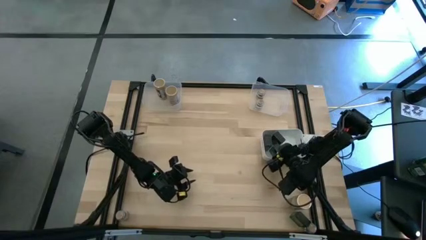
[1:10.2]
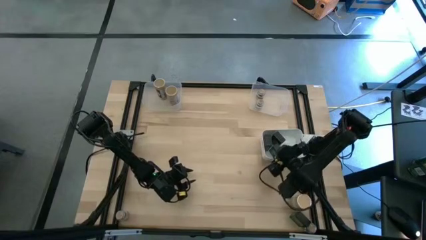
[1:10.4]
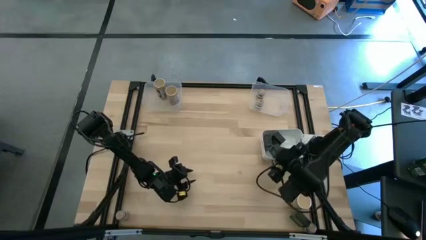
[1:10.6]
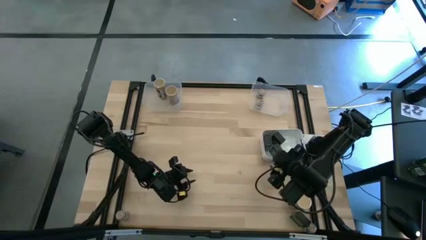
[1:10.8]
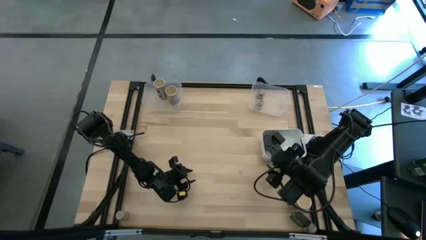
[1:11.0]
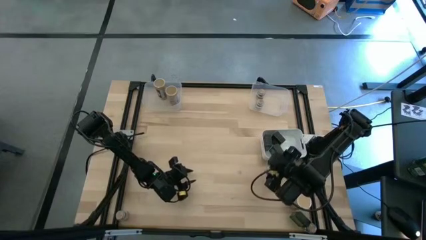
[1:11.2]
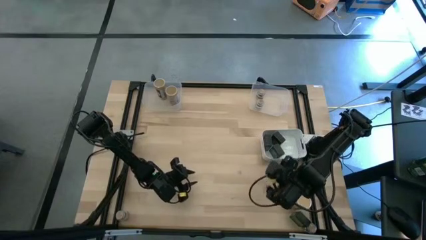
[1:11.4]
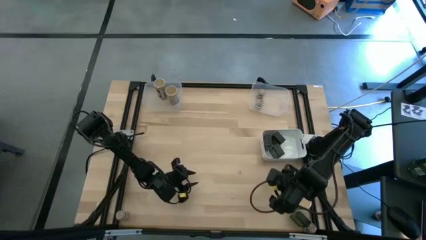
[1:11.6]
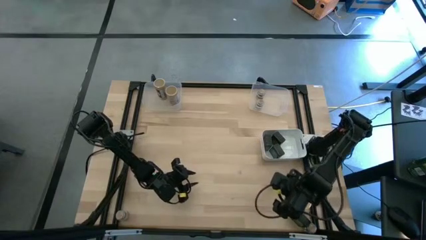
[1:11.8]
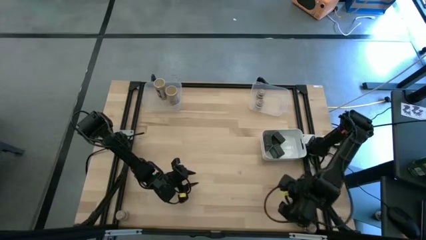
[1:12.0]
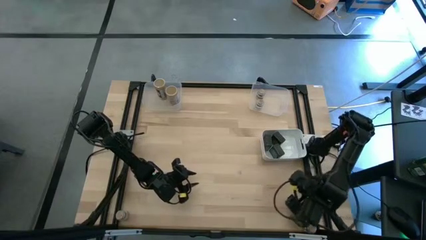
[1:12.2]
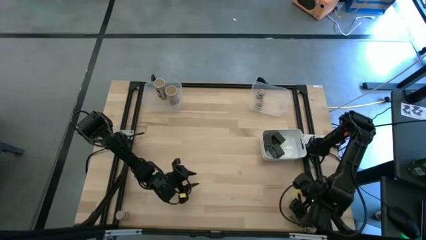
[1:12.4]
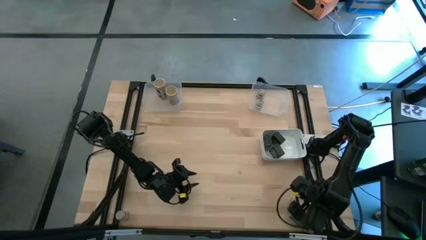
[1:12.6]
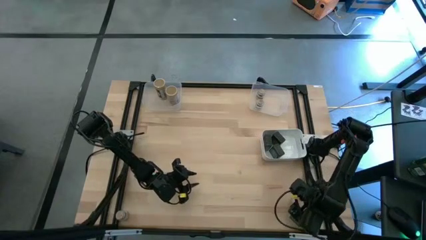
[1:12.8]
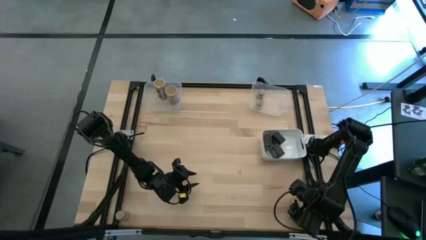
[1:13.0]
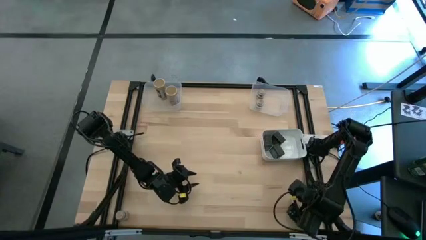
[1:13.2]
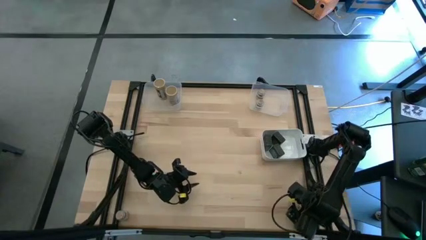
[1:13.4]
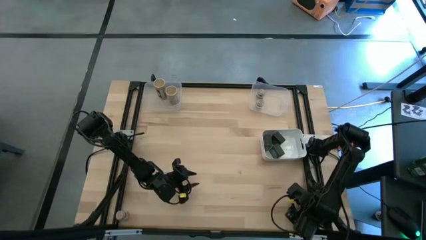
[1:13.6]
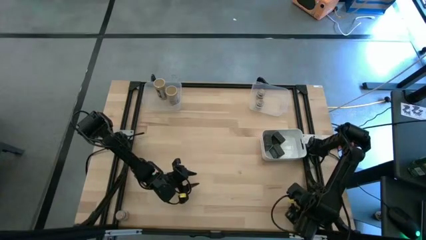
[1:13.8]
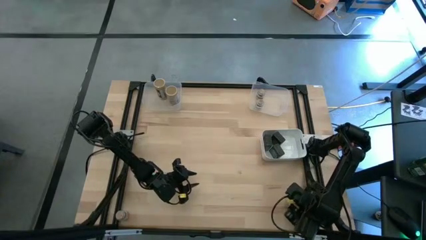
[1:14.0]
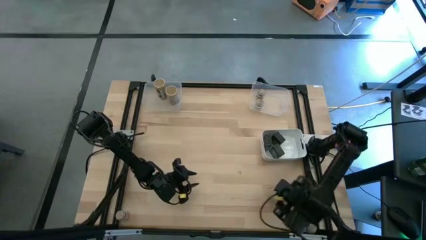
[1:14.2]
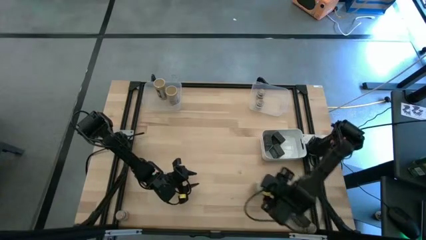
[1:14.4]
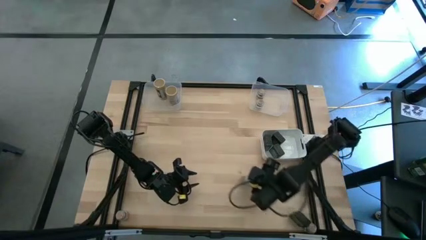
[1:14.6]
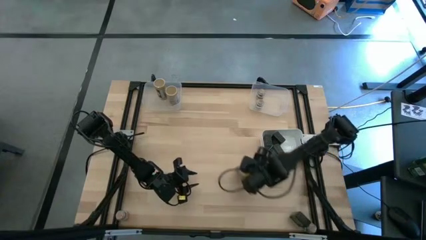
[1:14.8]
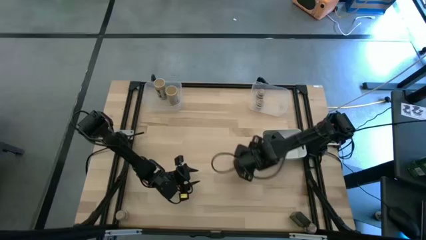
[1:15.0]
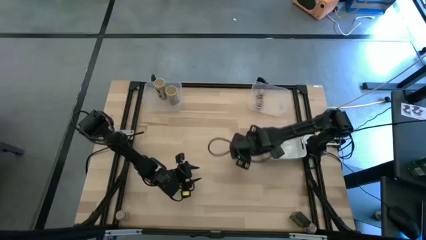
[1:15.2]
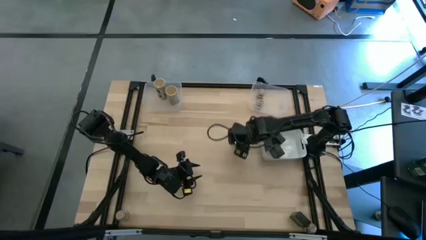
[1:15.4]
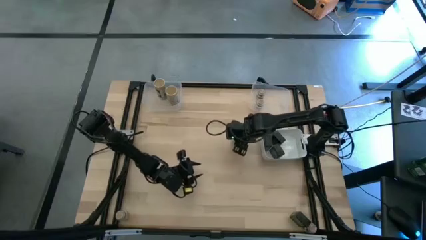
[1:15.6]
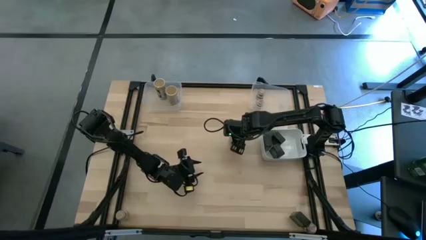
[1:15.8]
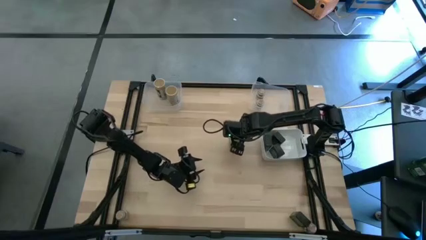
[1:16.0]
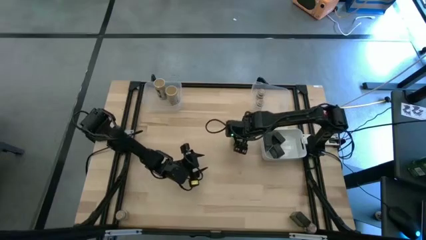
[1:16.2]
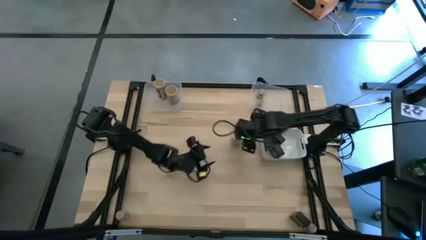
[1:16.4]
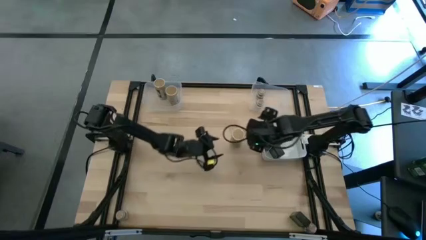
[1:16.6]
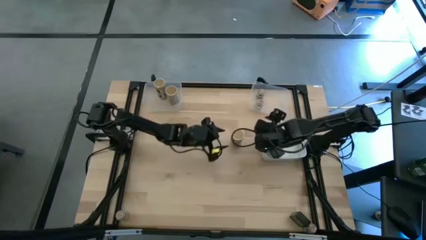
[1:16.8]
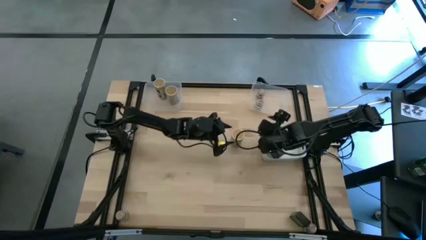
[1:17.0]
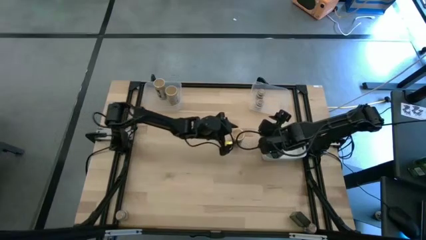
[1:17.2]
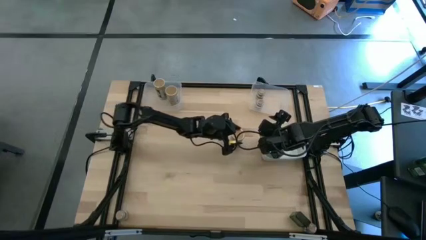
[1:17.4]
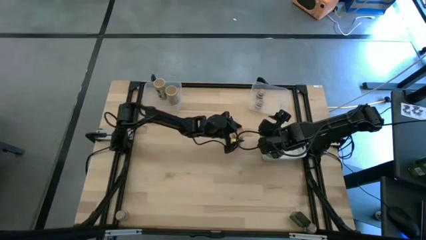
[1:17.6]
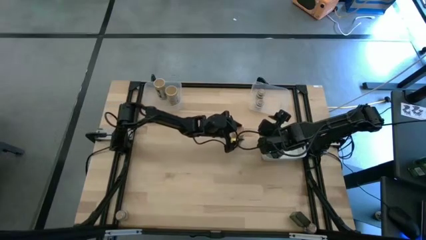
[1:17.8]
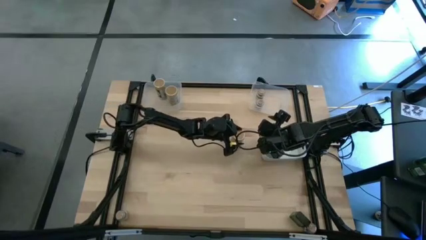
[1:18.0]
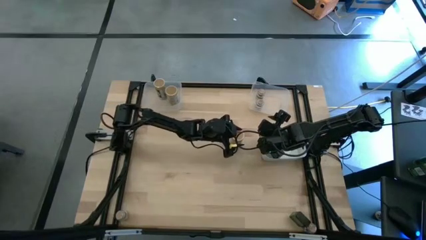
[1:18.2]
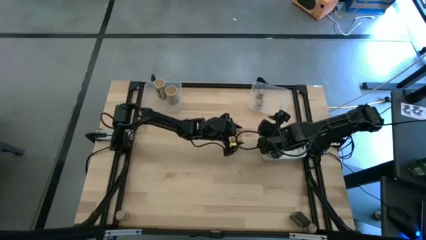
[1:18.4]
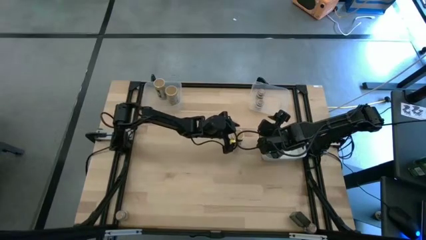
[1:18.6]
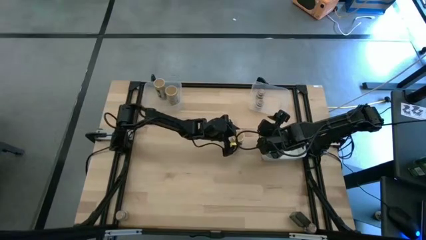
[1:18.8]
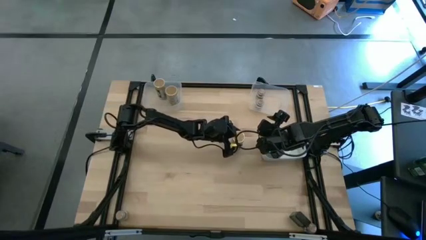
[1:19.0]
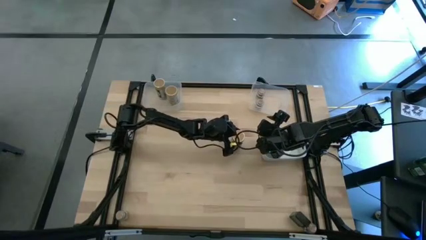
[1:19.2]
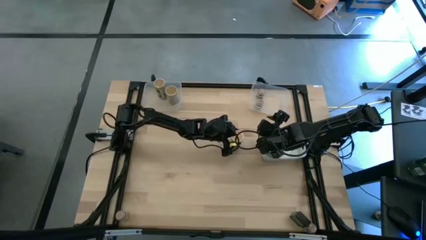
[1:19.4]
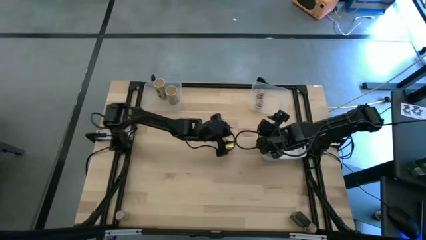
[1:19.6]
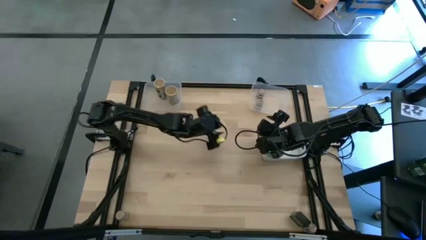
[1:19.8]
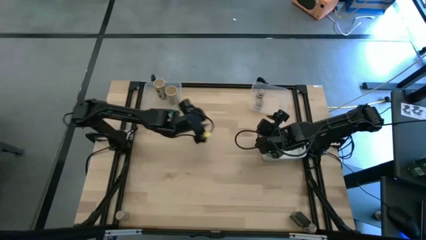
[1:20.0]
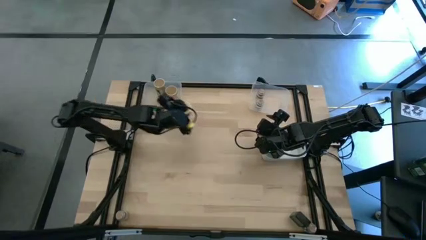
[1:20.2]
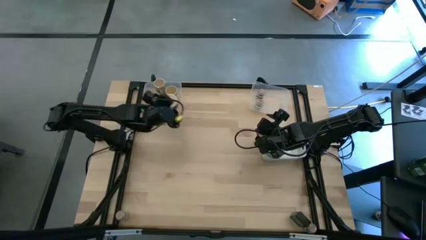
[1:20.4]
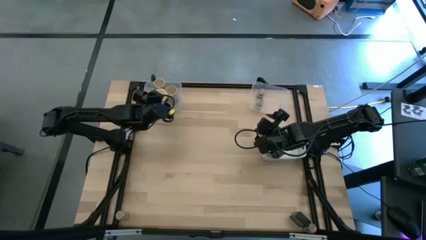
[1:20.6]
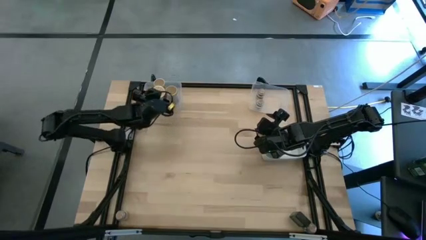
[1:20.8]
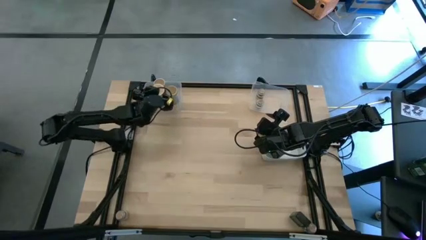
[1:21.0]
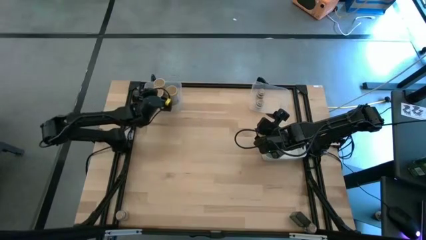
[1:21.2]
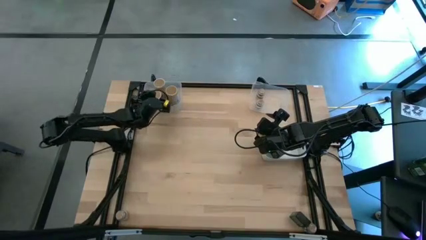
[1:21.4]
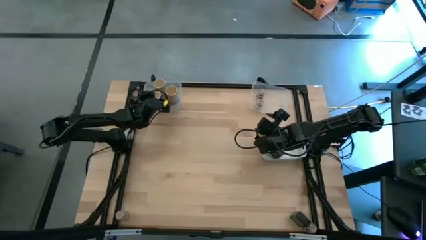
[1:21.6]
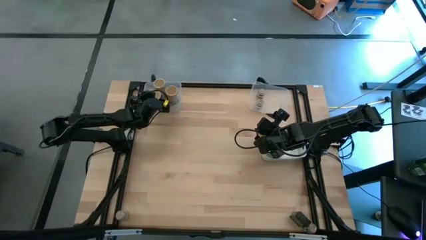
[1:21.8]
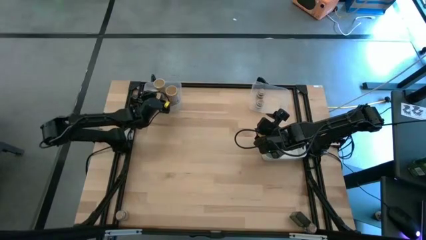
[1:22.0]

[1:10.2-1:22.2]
Task: Sort spices by type
Put the cream brown seasoning bottle into the left transparent bin

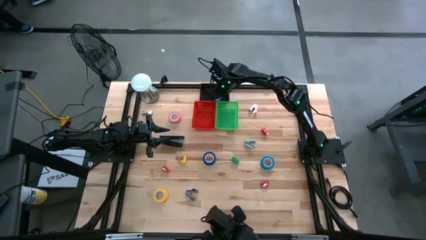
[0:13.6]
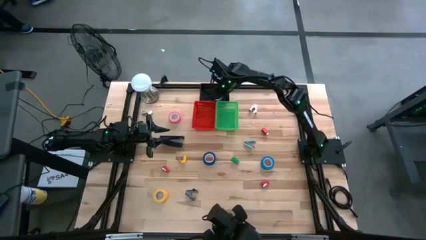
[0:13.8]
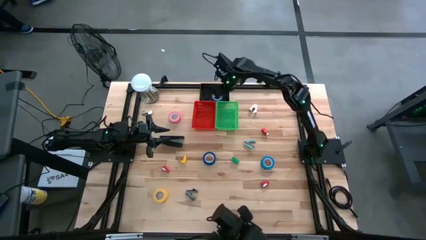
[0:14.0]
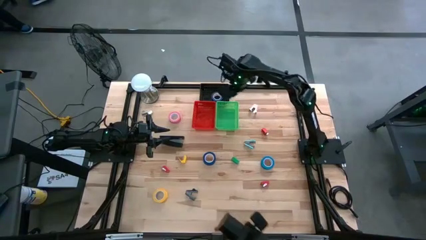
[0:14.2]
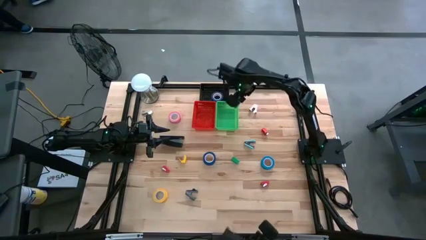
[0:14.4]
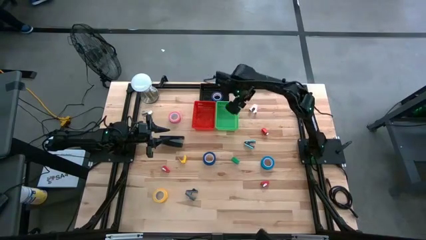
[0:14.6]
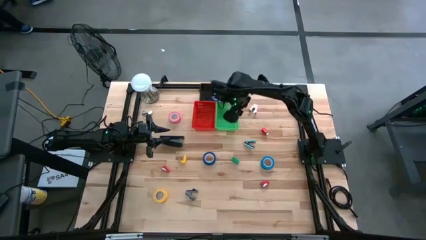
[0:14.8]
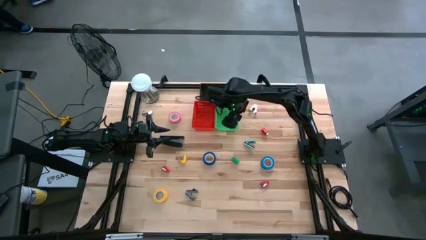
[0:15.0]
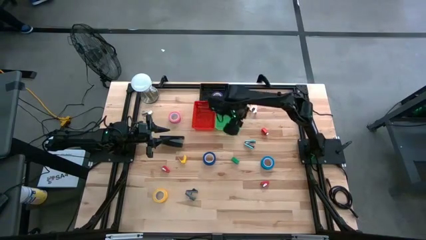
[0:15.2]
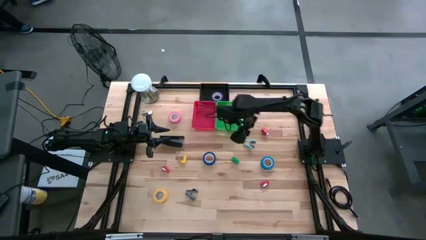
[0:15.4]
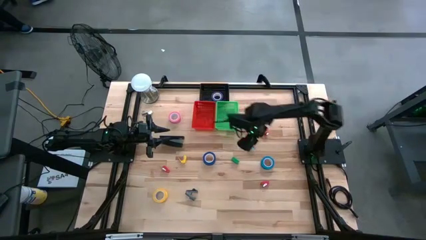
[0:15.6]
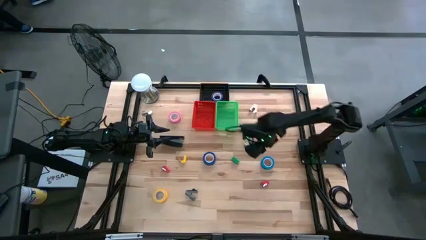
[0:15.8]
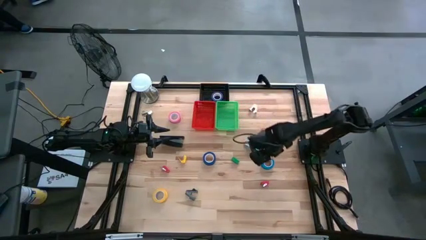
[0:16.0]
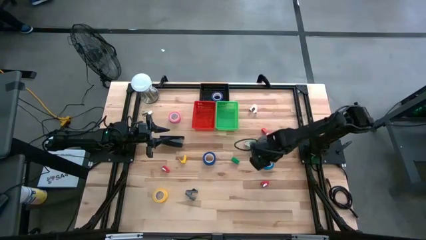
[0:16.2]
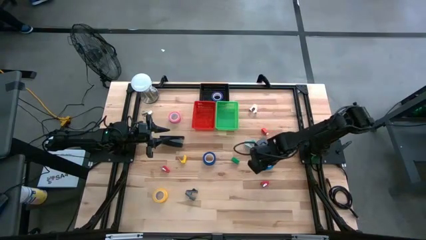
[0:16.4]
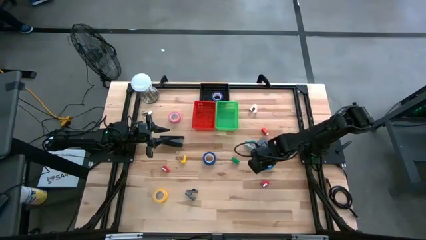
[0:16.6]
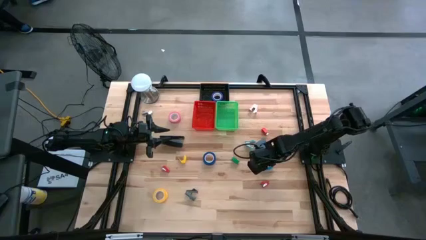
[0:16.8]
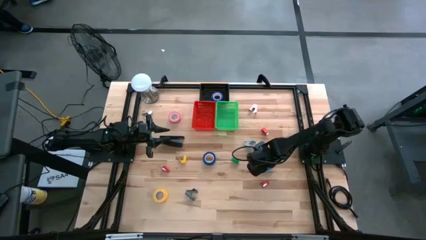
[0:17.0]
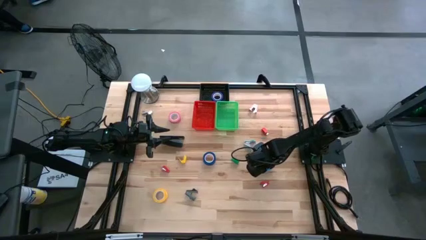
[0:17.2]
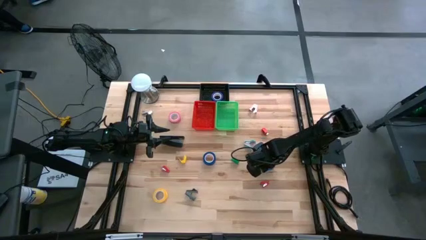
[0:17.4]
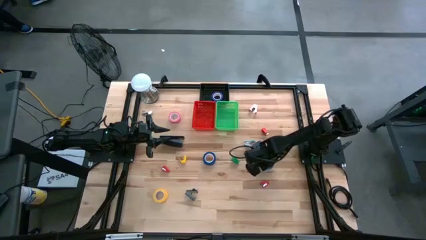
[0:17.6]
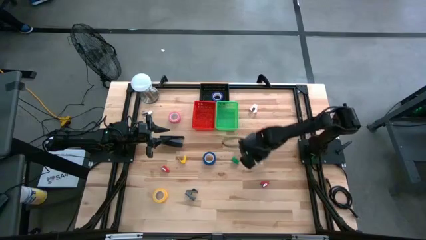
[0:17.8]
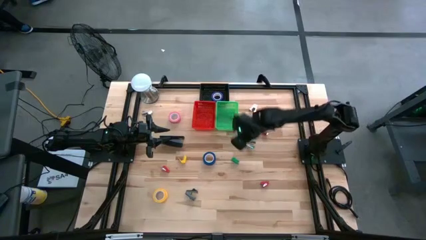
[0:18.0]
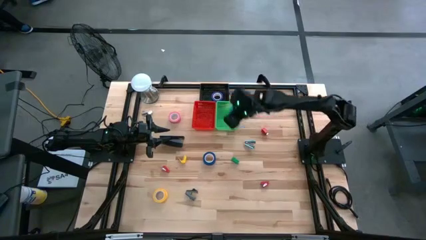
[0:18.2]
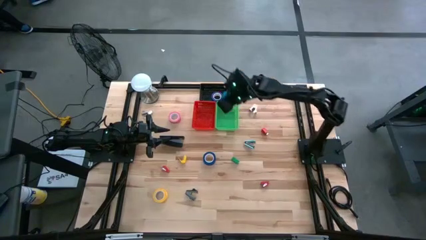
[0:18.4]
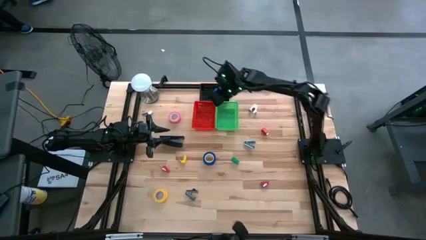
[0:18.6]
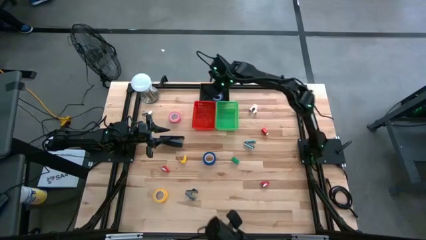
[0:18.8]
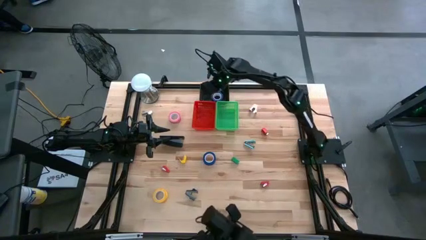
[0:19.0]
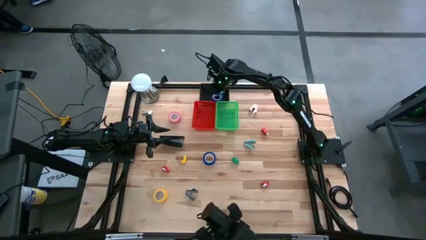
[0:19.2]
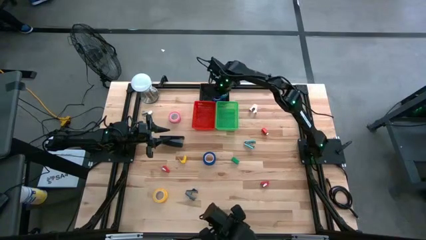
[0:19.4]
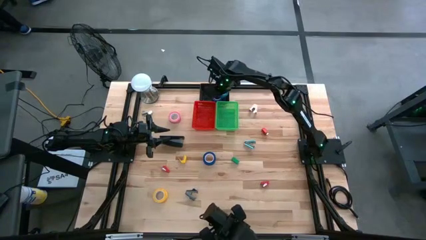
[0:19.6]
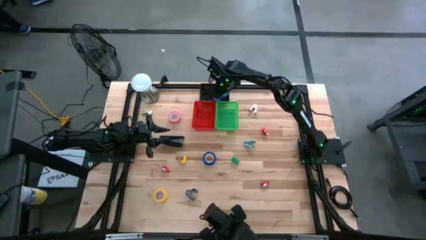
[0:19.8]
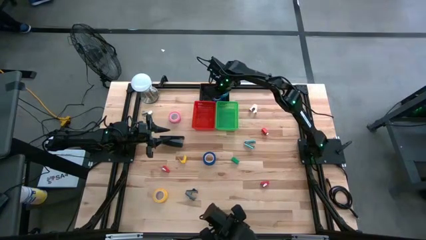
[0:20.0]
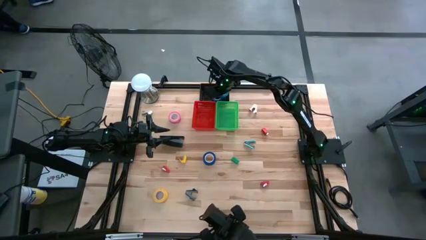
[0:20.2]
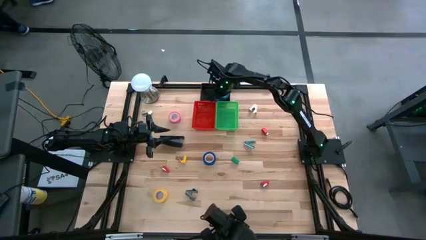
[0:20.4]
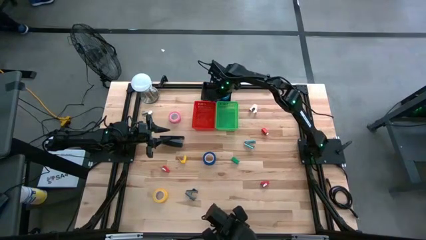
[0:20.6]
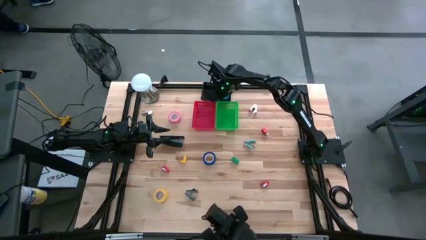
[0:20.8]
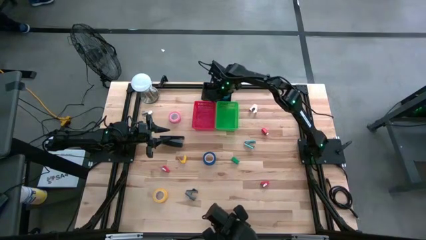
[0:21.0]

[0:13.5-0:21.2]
Task: Pick and place Stapler, Stapler remover, tape
Put the blue tape into the black bin
